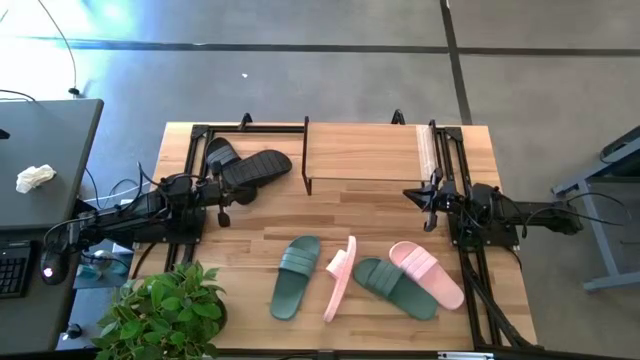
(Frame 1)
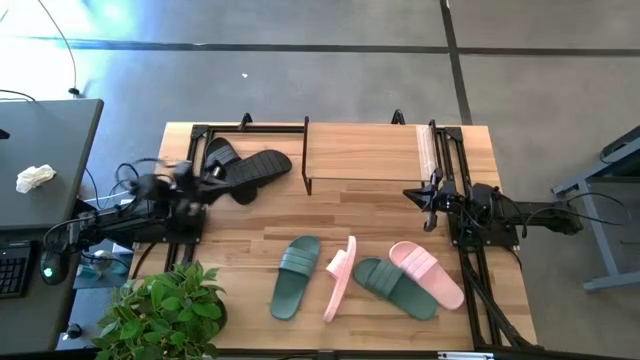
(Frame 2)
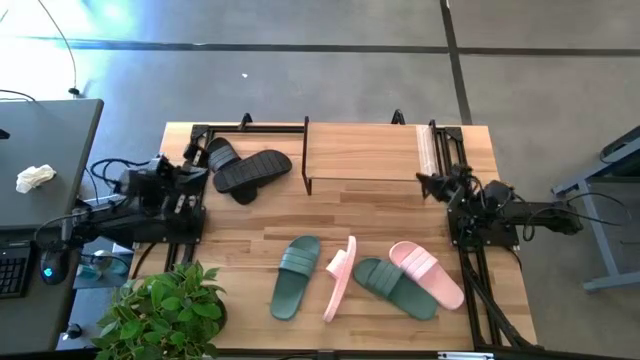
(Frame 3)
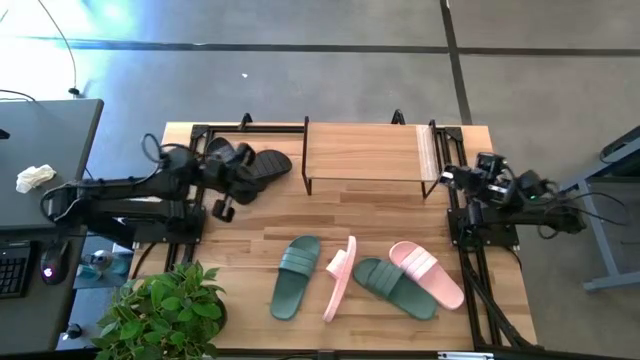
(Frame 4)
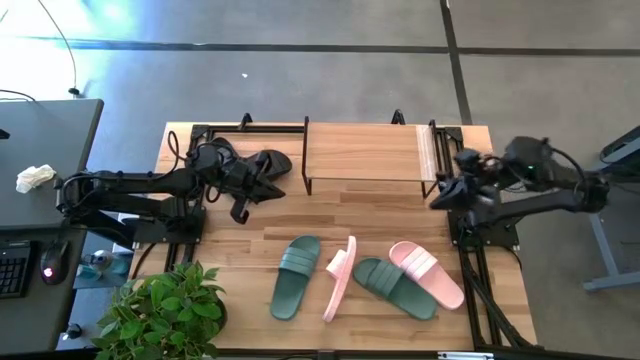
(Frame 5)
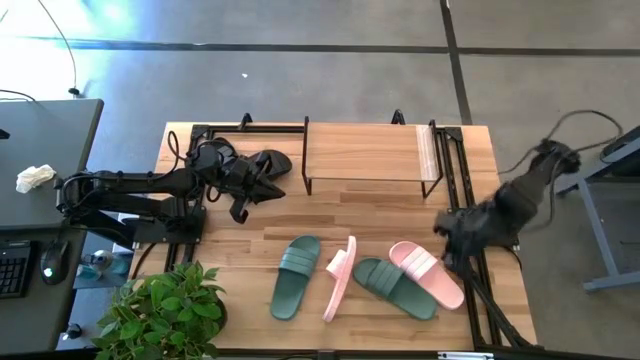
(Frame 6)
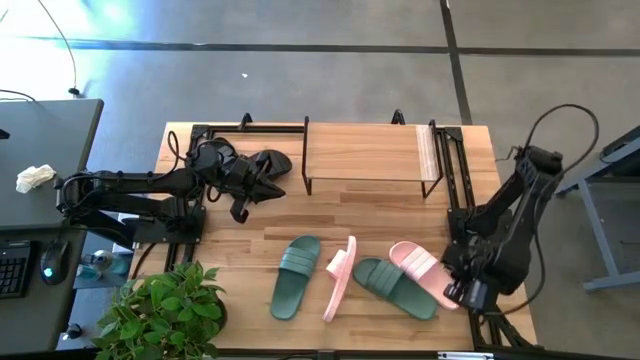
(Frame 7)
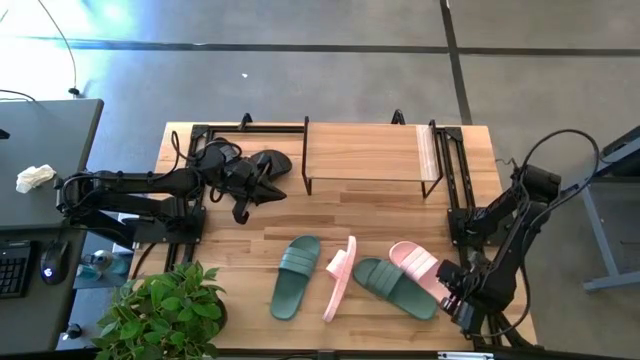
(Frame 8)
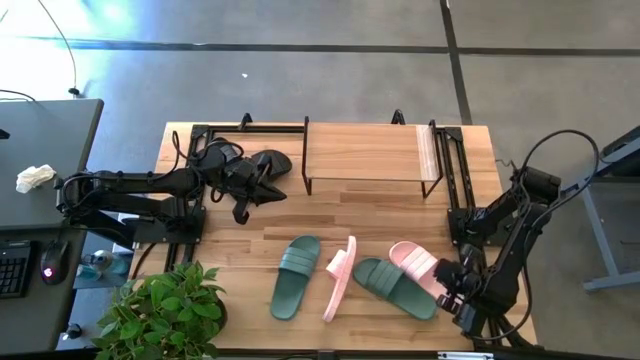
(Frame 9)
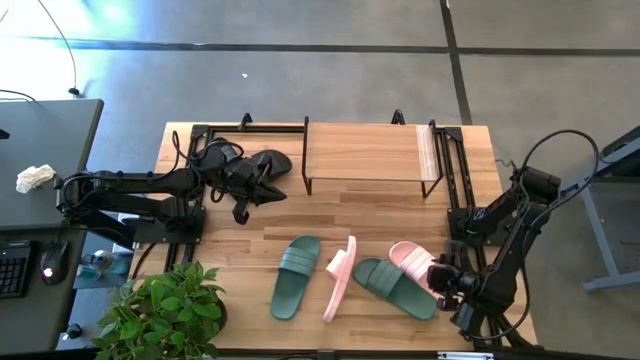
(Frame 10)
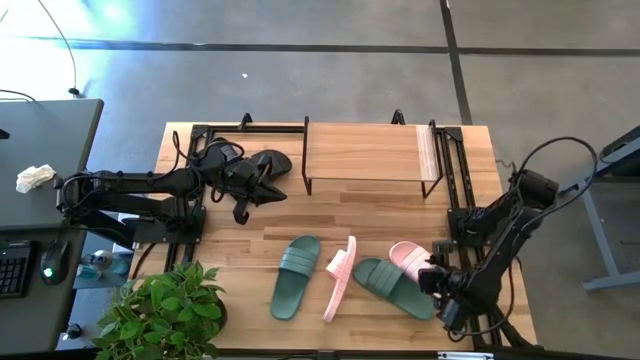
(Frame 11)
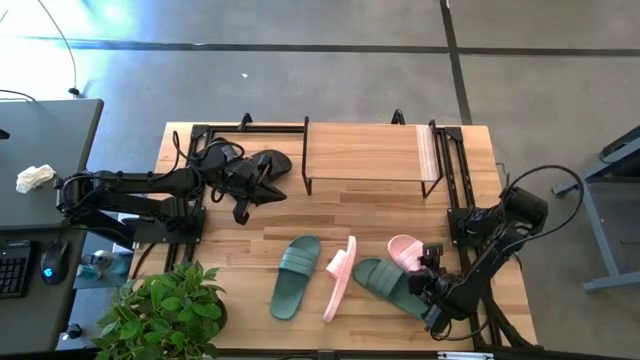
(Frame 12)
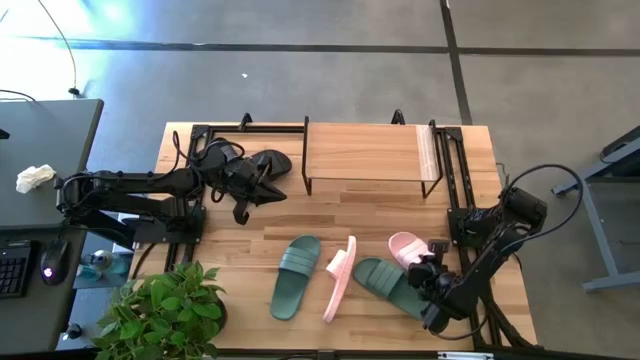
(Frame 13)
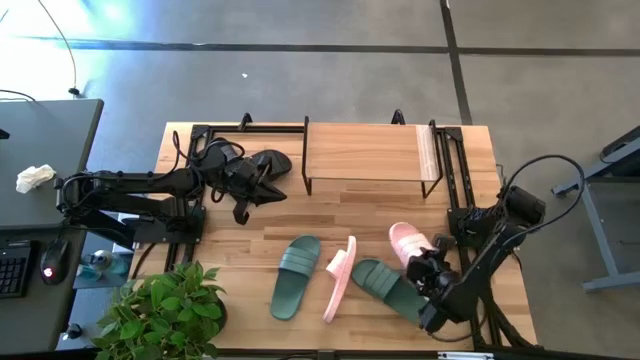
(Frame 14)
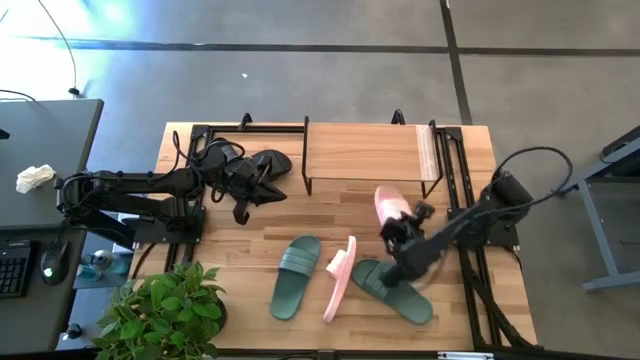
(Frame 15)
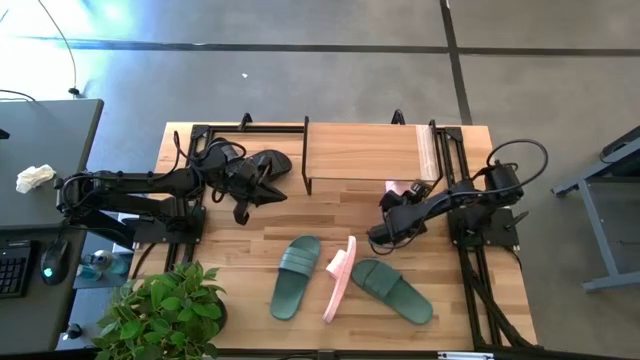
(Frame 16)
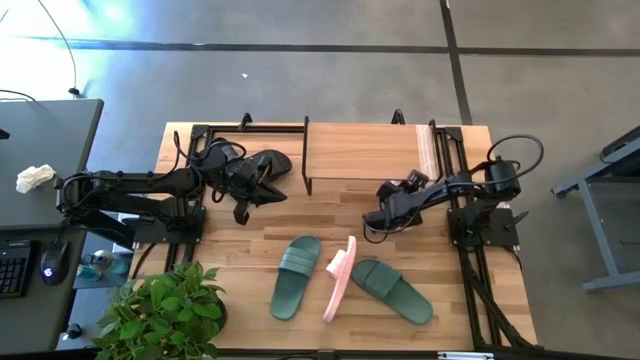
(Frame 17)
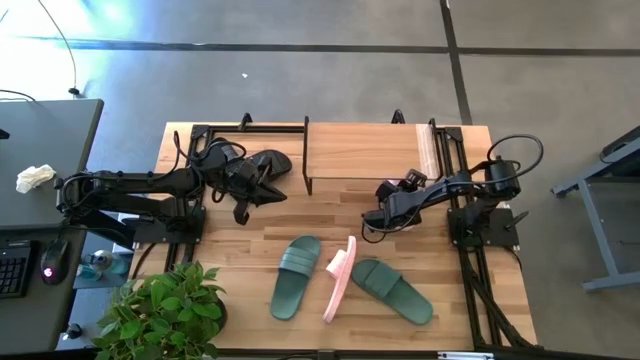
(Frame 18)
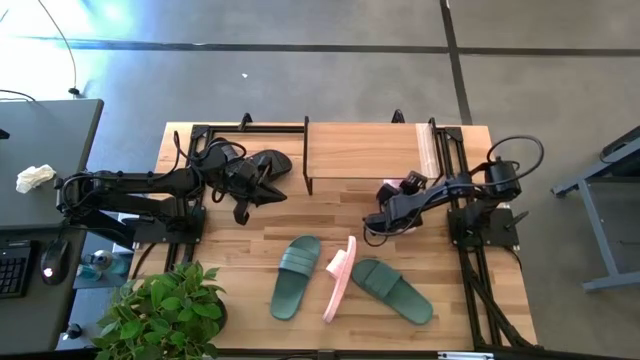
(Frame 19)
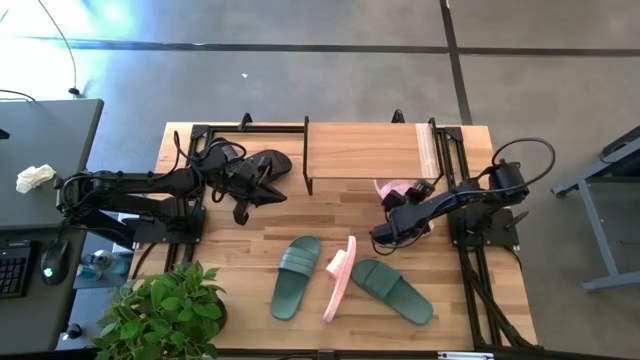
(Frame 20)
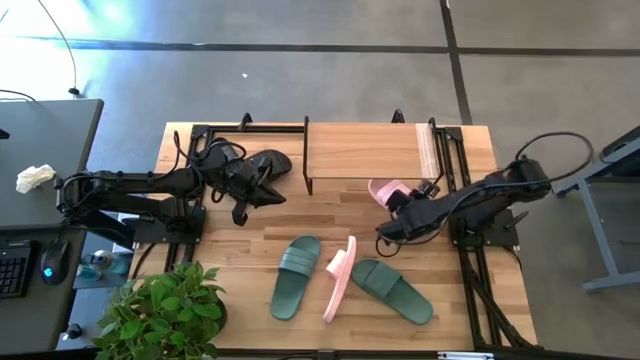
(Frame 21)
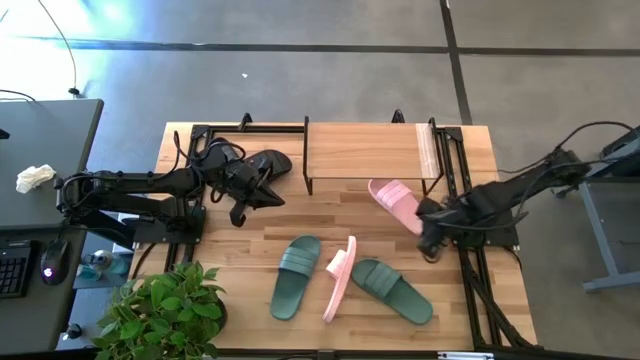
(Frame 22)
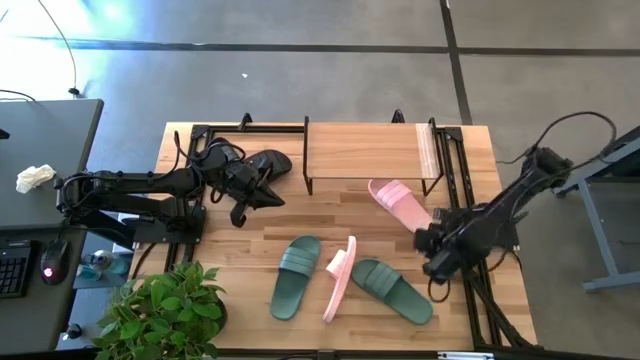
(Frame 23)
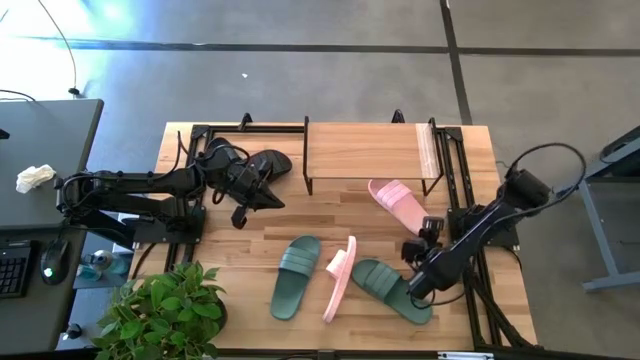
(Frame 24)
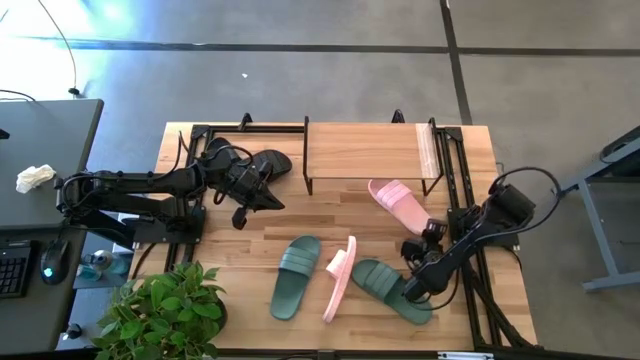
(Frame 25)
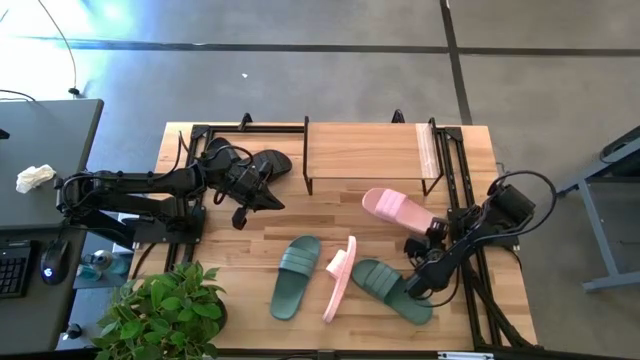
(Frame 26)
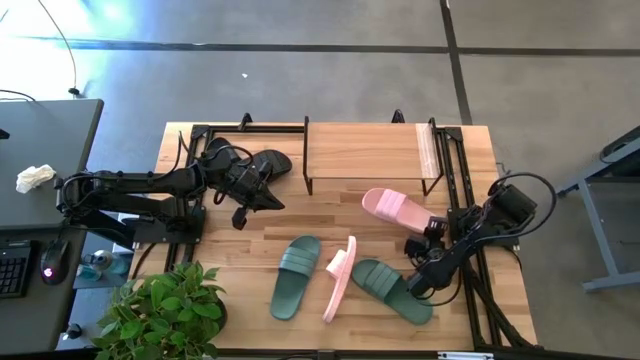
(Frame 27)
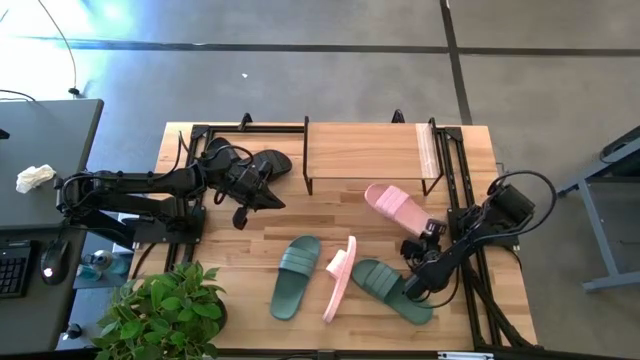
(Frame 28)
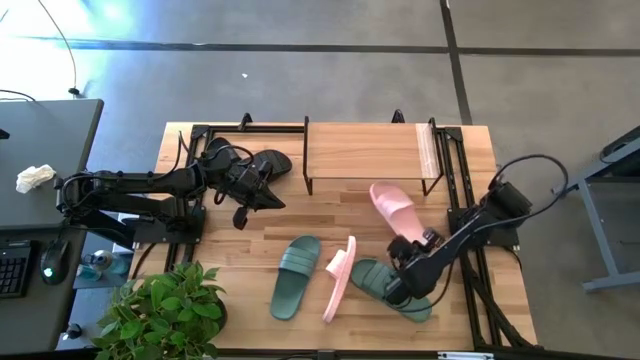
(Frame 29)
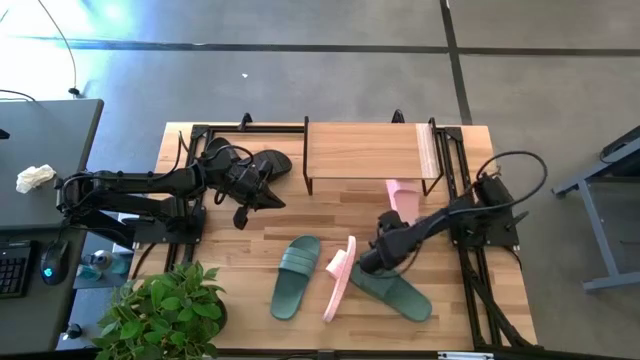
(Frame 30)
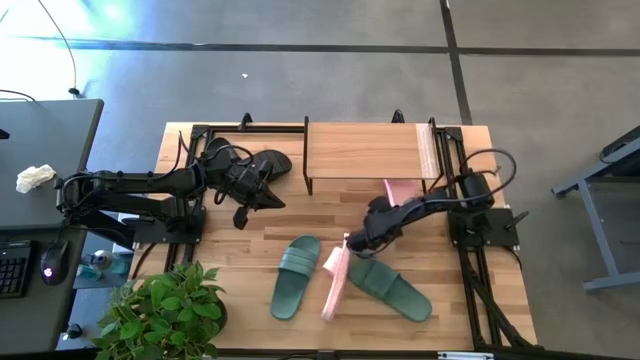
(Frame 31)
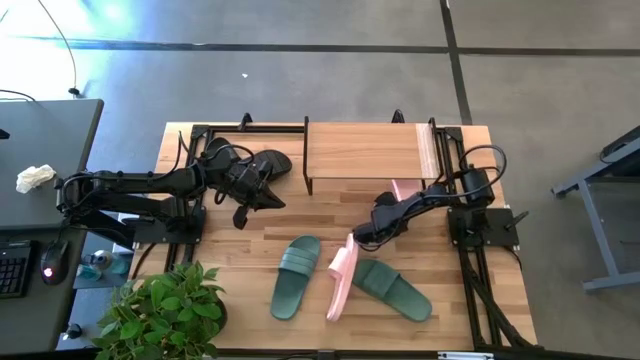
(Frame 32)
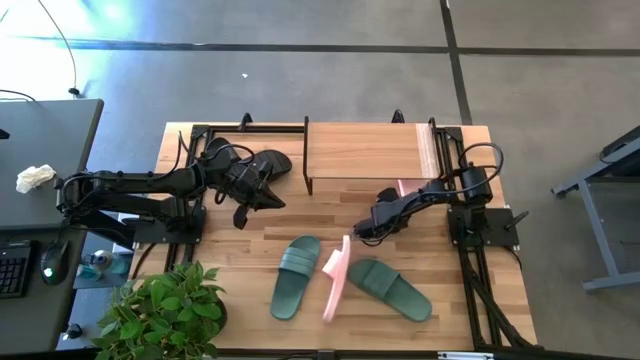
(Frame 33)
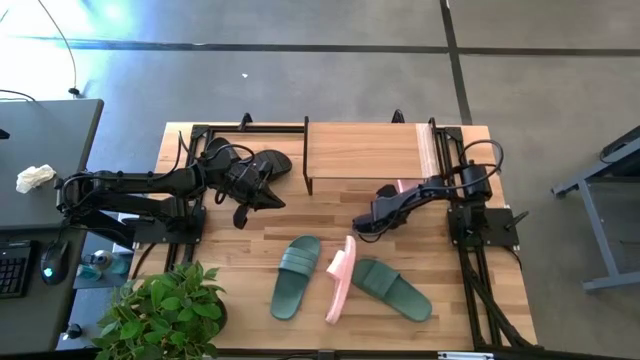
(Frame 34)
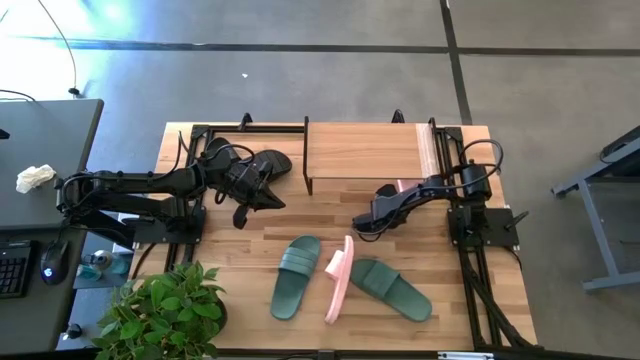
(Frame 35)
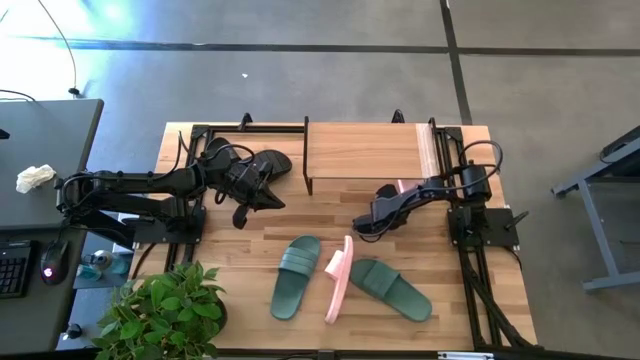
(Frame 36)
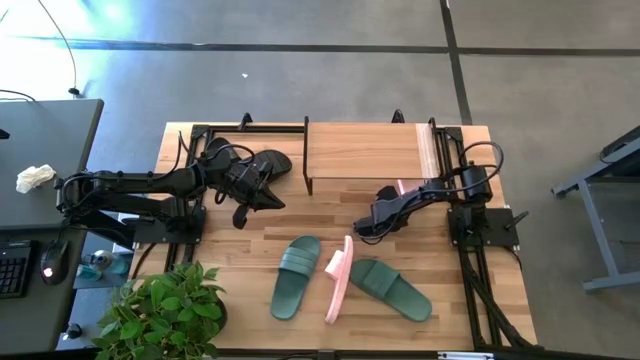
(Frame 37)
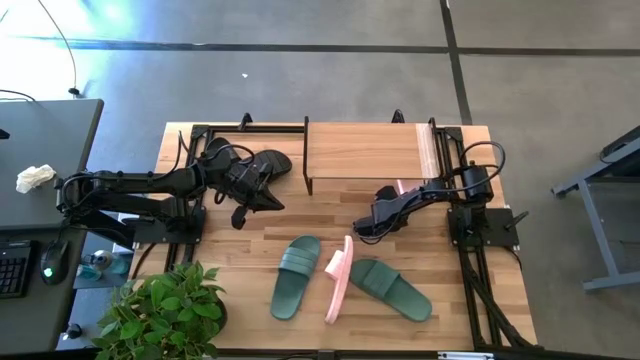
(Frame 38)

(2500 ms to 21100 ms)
Task: Pick and place slides into the shelf
Put the right pink slide under the shelf
